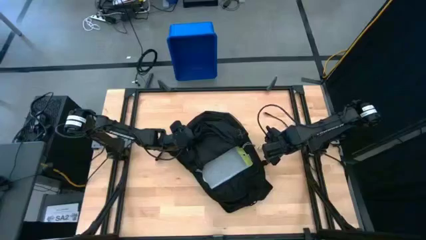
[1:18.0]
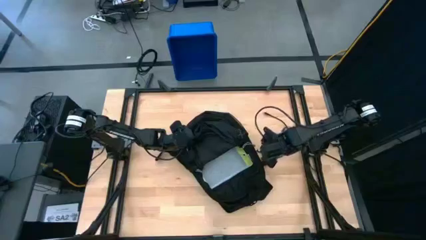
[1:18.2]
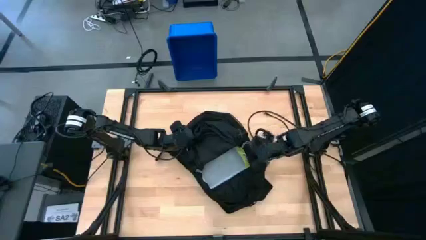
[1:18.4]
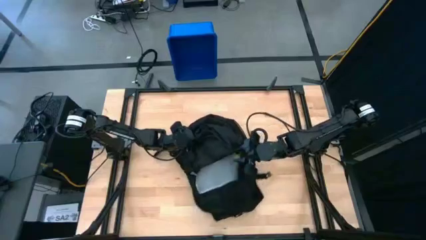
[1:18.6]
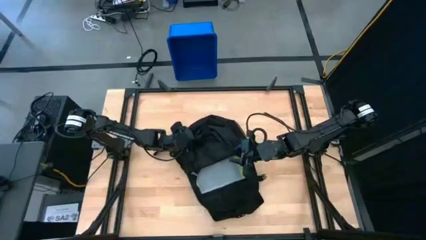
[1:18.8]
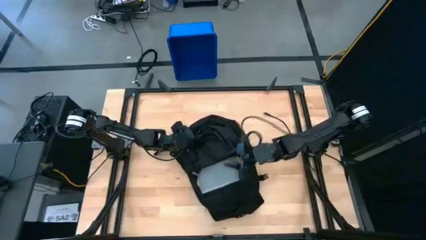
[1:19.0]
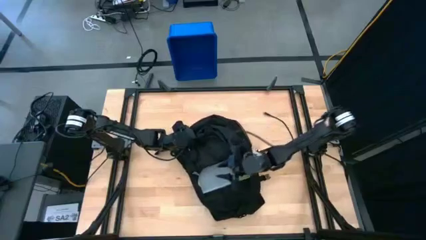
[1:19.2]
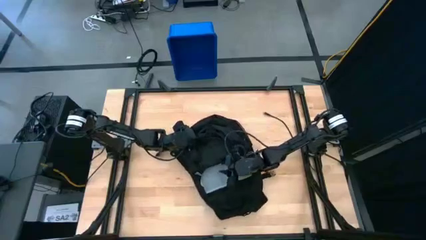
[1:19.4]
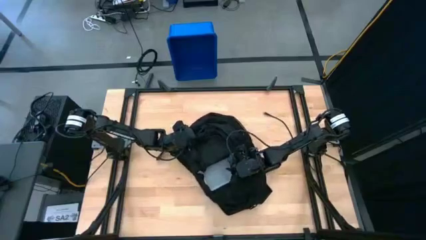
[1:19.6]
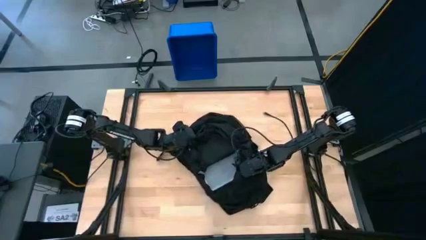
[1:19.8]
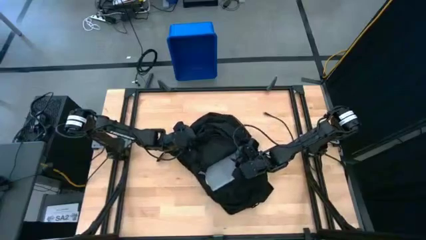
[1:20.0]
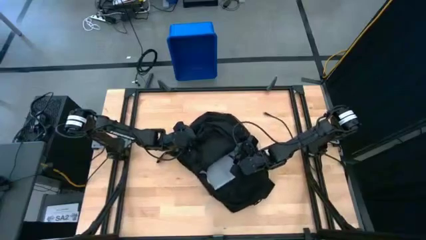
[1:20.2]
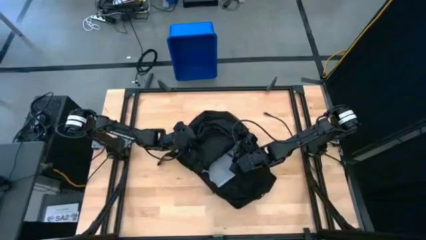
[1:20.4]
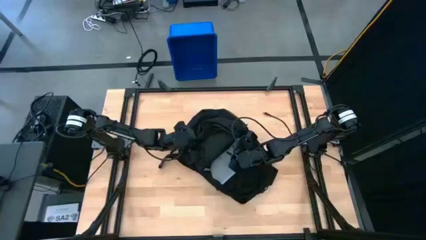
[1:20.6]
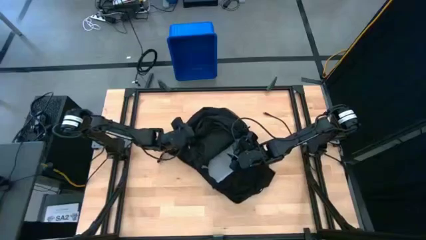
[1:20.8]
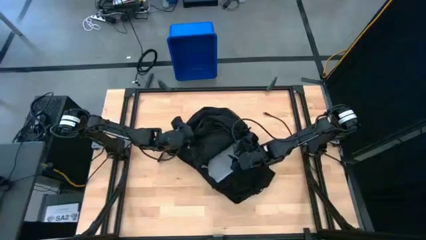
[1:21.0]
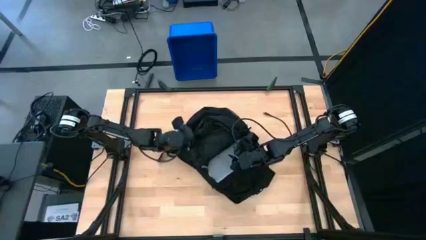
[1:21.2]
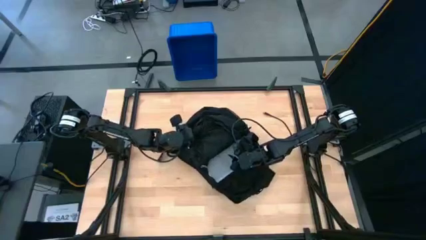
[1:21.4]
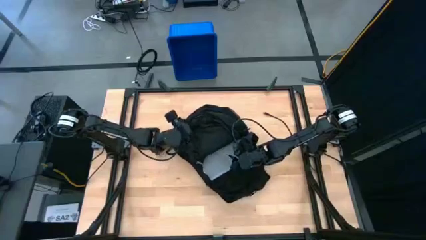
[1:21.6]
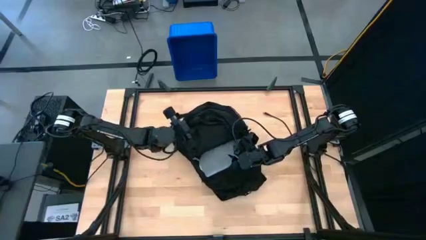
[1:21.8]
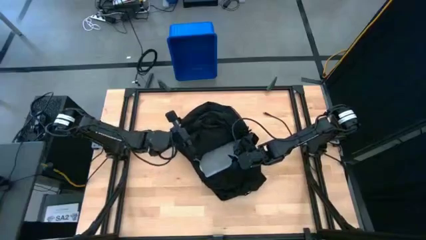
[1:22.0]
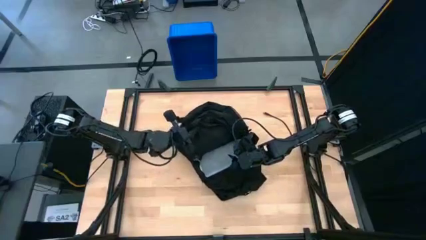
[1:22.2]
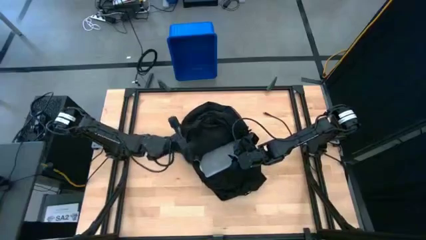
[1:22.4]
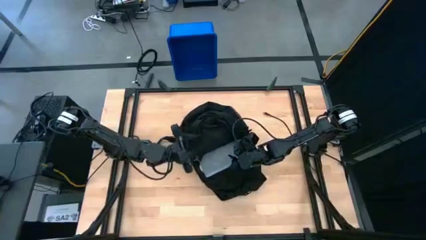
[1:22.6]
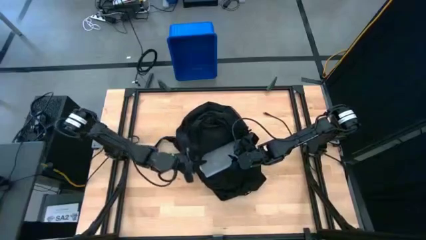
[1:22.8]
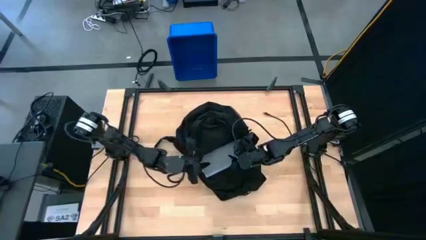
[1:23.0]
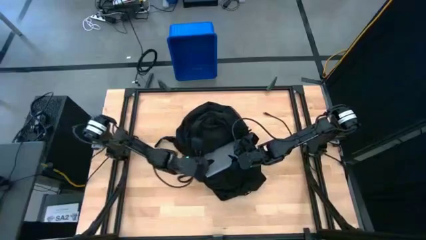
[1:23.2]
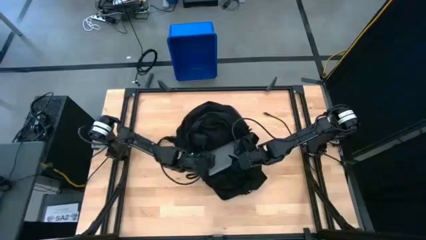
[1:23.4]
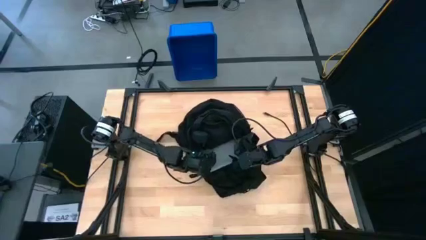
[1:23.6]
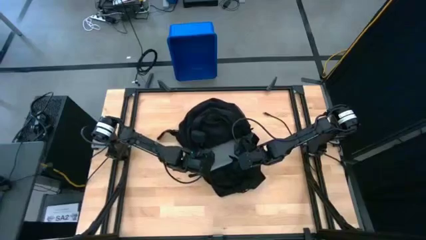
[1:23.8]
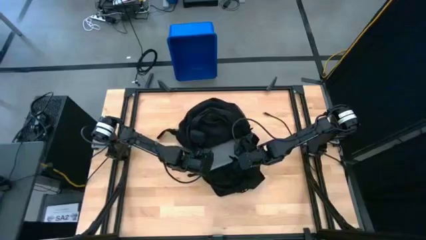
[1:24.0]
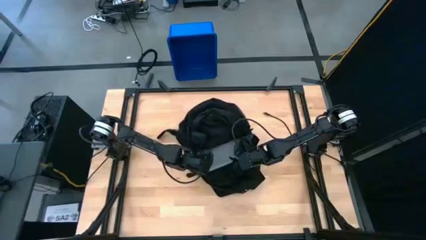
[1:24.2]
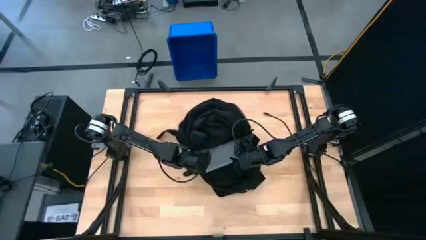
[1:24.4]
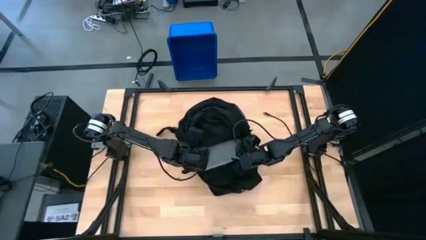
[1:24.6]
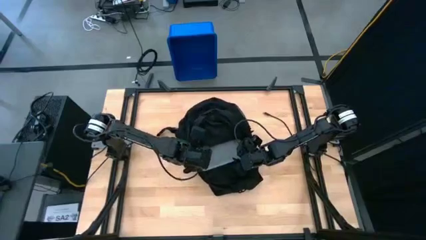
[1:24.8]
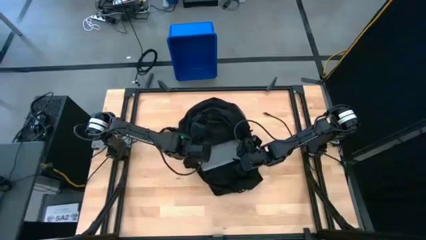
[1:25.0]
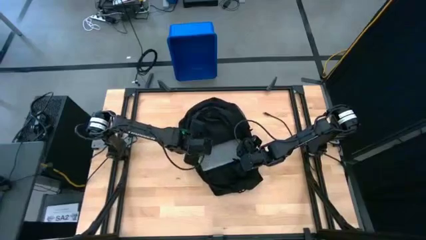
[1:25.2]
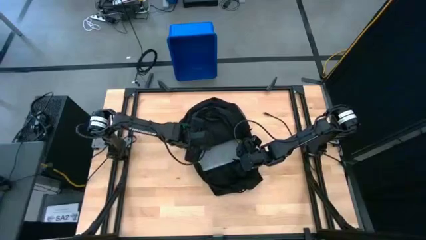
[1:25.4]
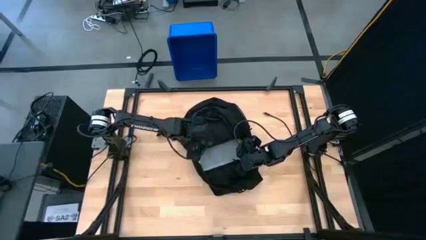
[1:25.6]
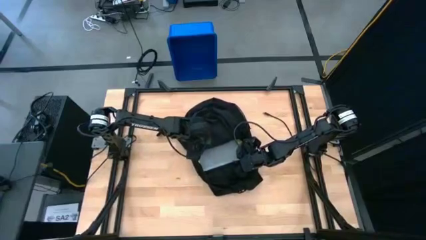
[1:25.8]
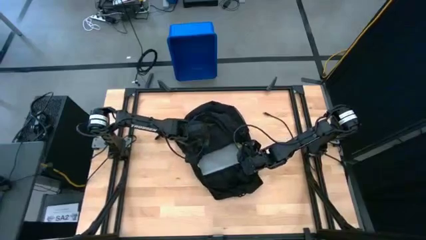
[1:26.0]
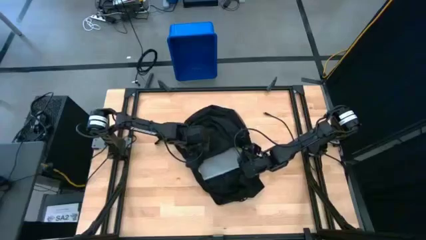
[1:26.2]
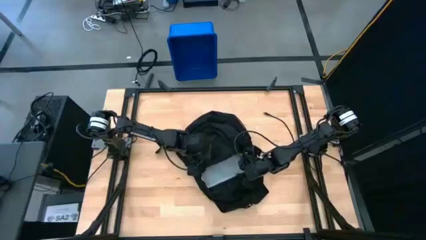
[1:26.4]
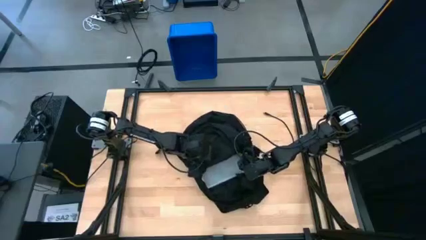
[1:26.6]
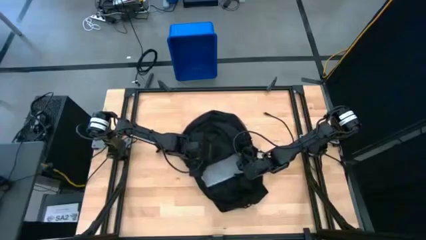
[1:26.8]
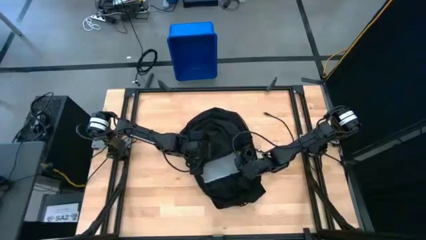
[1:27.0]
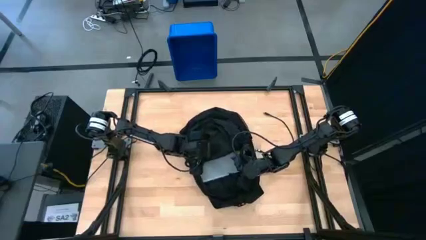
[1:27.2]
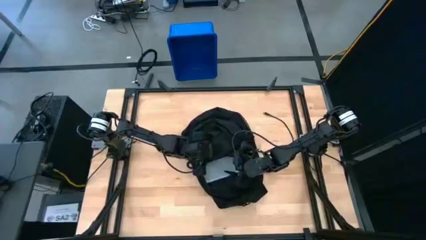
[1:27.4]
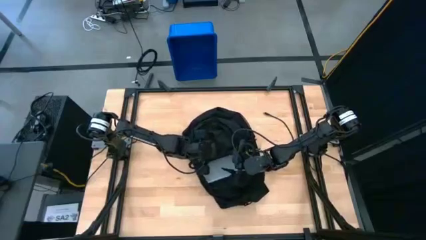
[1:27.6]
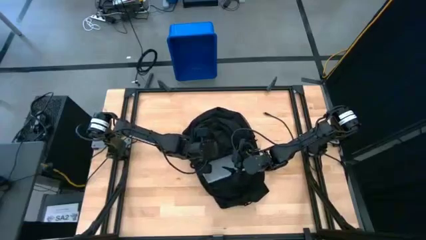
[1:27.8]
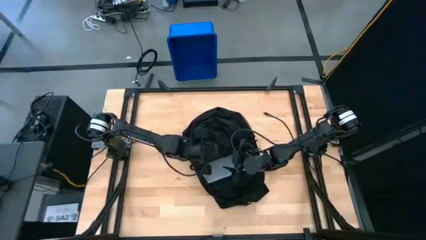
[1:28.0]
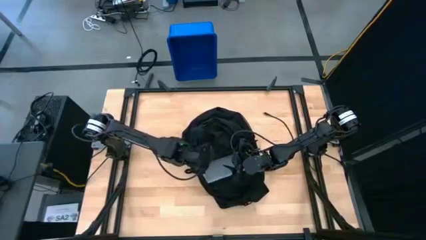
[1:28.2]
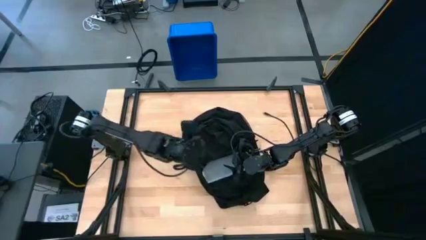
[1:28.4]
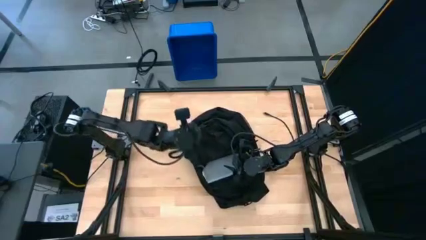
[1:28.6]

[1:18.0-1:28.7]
Task: Unpack backpack
Remove the phone from the backpack

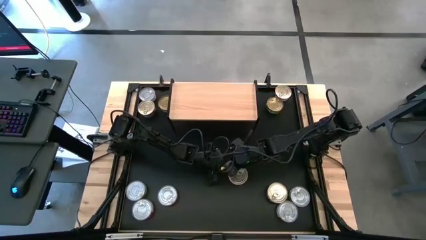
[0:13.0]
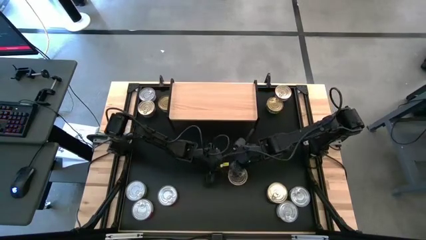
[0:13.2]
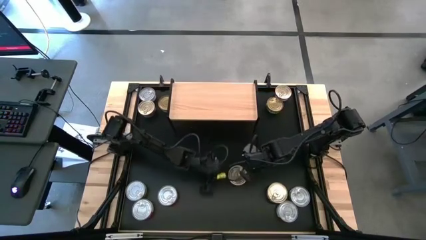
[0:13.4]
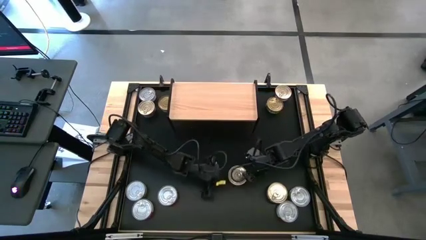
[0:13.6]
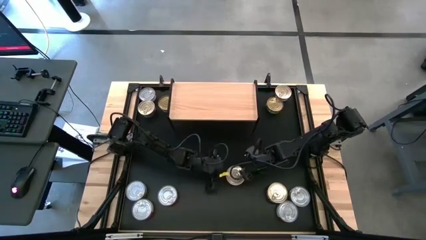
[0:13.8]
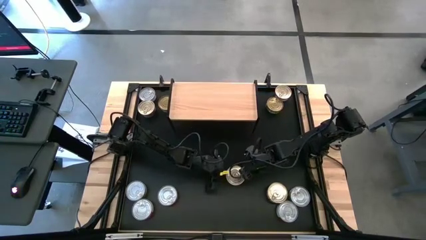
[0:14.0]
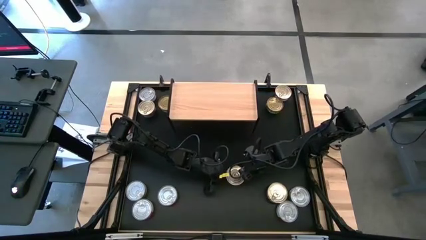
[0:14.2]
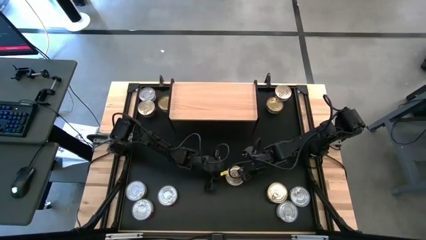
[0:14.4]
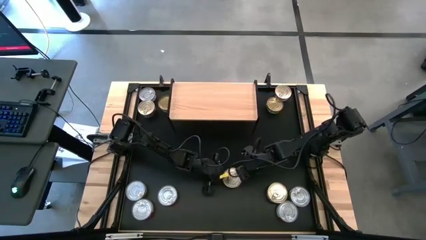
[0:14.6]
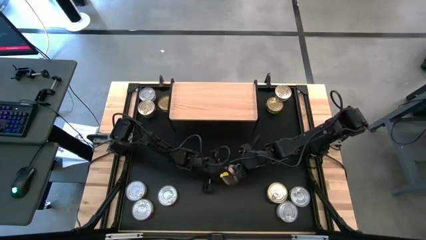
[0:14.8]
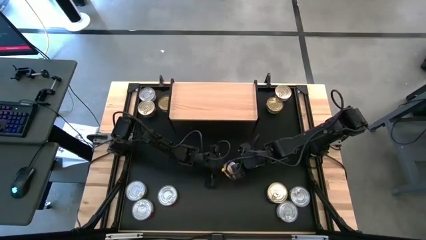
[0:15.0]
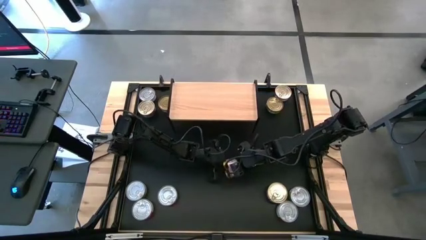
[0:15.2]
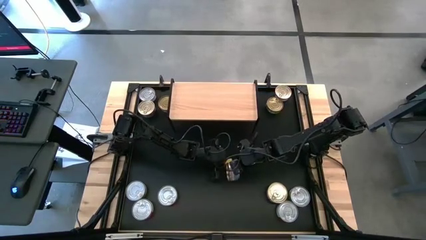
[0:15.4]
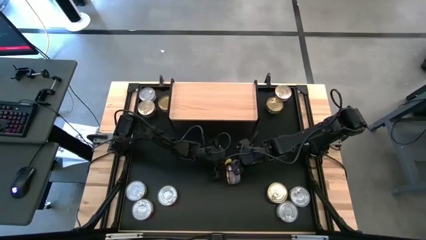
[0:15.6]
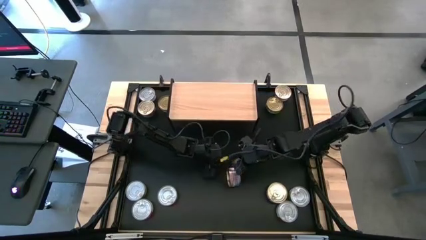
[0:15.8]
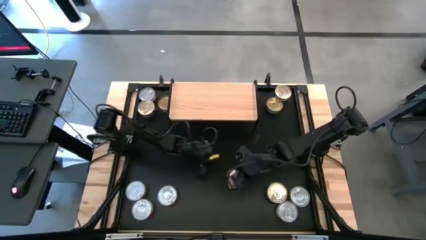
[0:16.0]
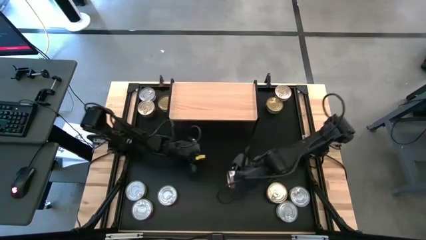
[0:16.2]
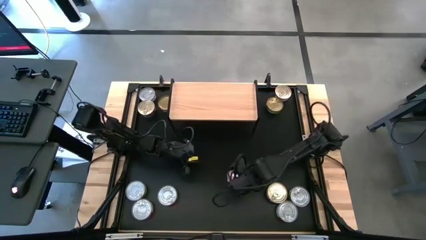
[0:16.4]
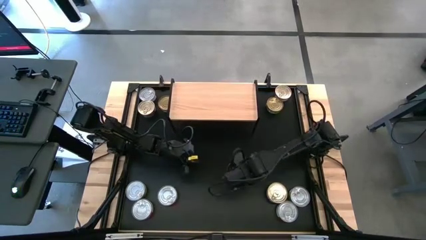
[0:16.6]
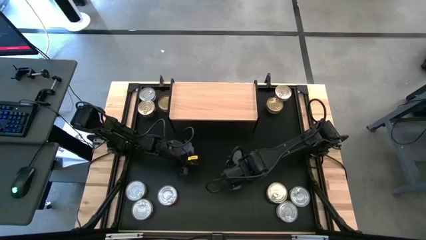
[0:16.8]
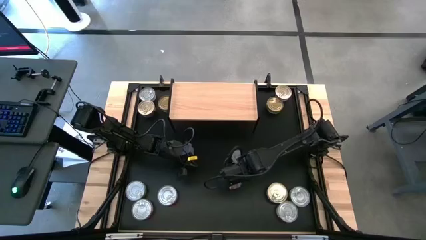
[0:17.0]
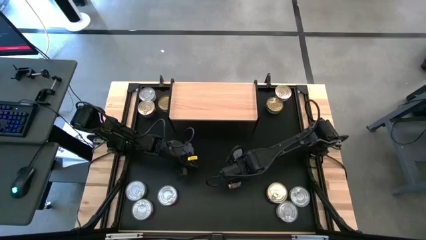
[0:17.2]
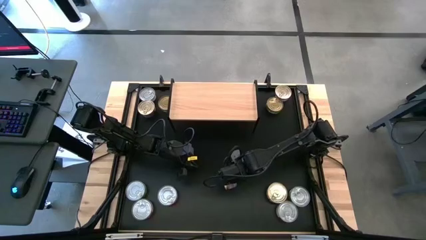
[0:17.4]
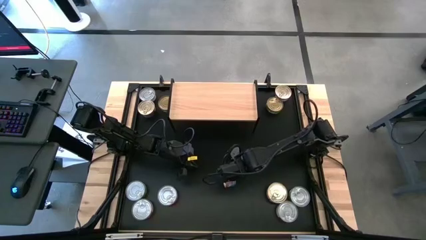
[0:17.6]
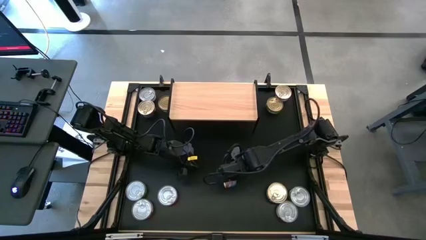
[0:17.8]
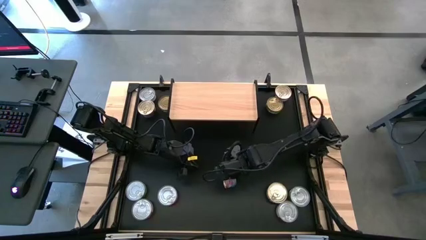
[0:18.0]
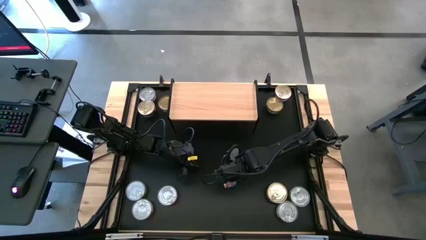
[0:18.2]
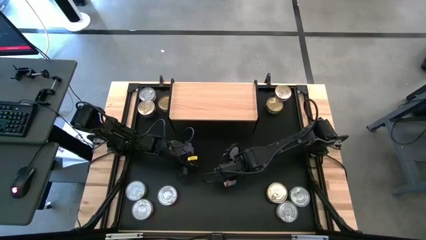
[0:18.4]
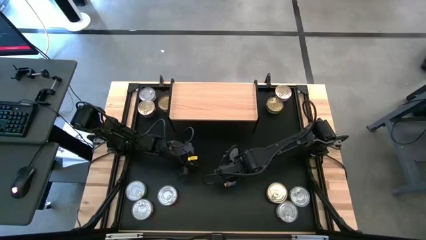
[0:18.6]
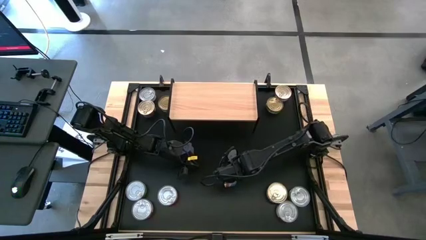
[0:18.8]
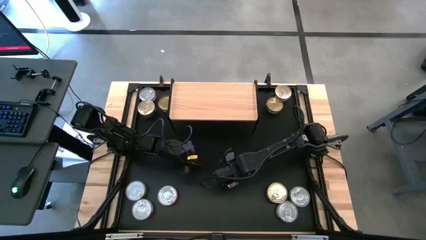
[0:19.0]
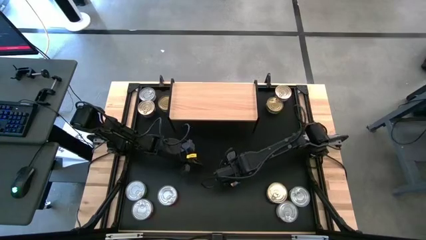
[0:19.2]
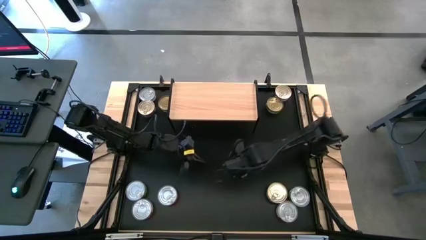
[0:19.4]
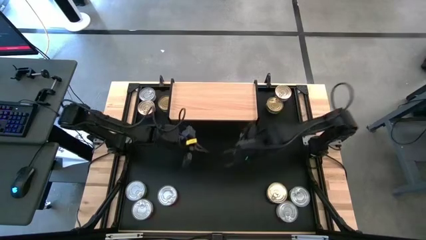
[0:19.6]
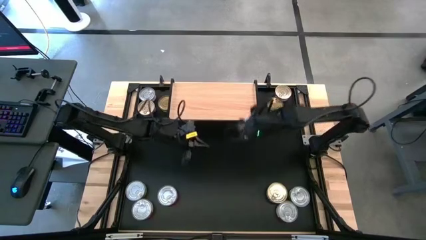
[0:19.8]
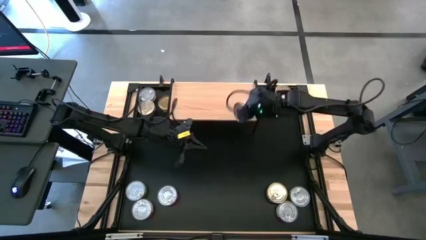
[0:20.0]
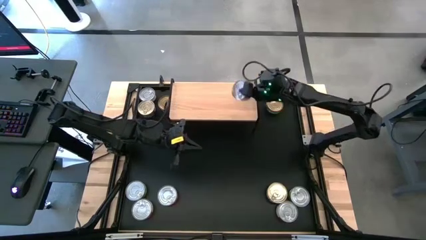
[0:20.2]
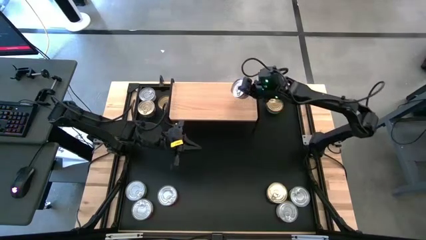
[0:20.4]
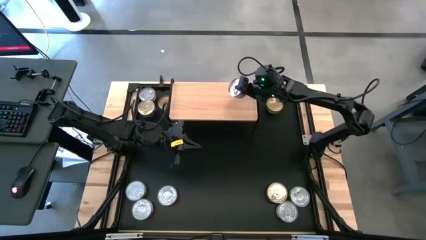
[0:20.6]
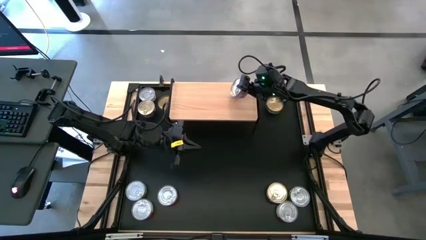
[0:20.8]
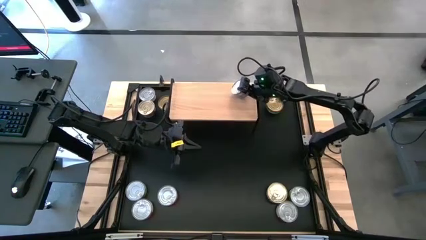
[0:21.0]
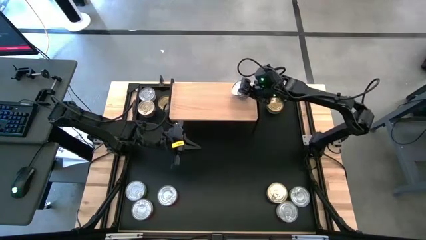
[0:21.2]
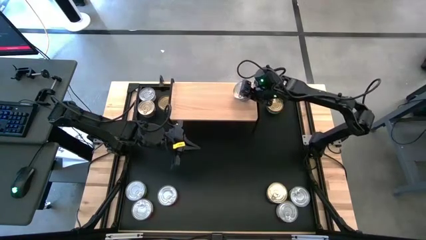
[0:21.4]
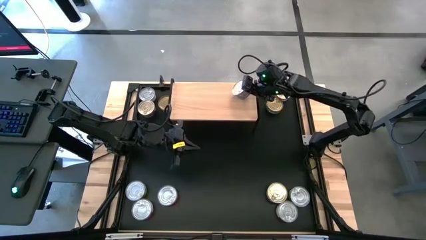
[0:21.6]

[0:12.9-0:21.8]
Task: Stack canned seafood by type on shelf
Put the blue and pink tuna can on the shelf
